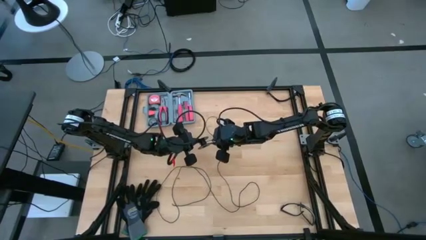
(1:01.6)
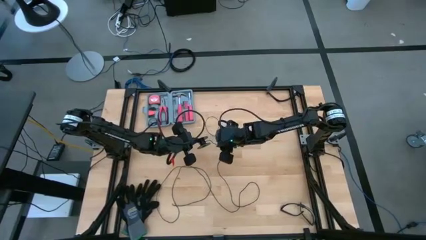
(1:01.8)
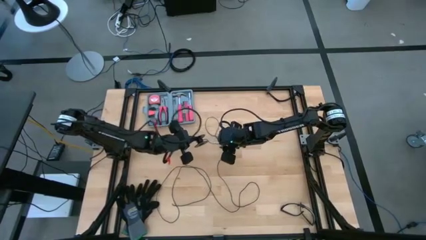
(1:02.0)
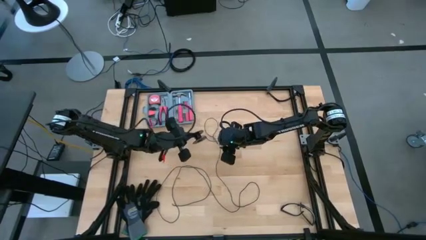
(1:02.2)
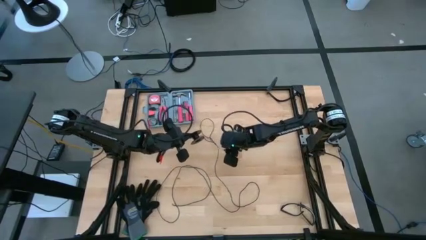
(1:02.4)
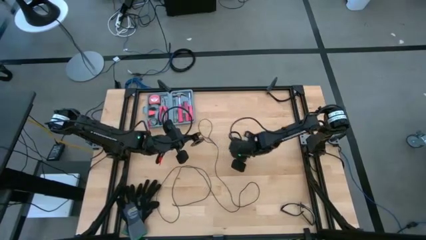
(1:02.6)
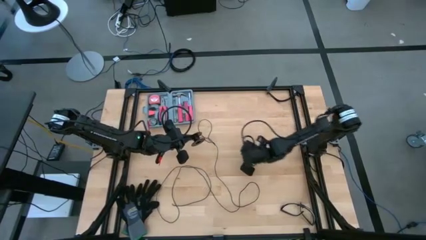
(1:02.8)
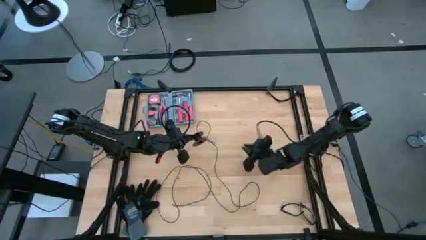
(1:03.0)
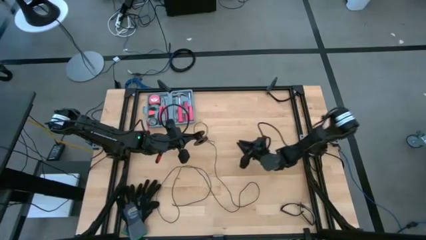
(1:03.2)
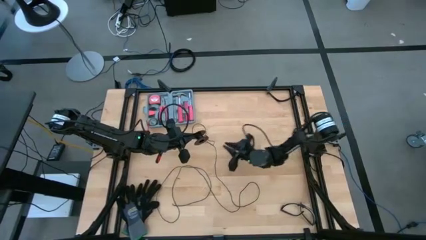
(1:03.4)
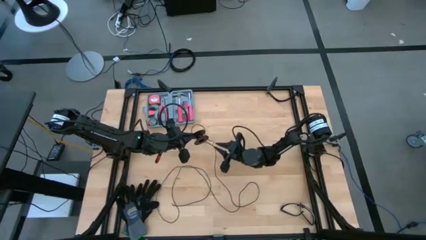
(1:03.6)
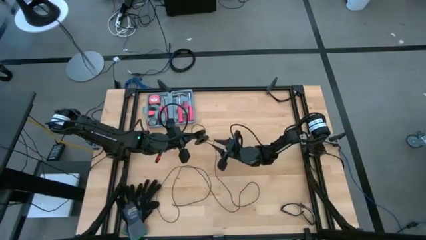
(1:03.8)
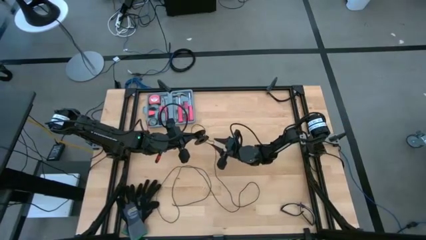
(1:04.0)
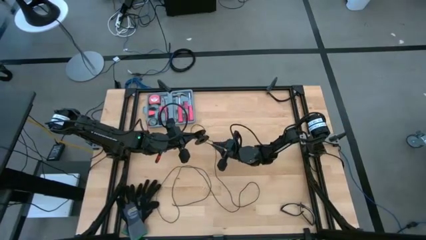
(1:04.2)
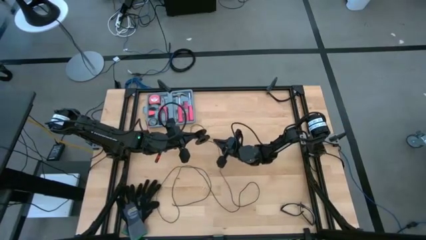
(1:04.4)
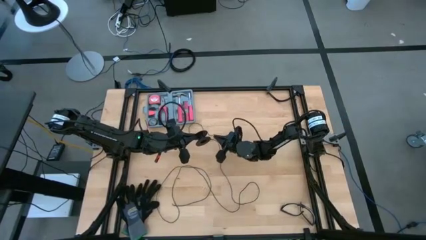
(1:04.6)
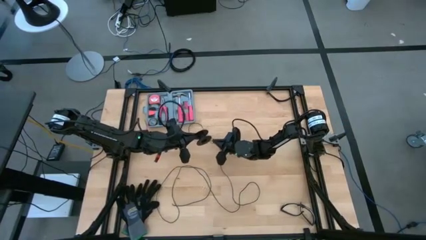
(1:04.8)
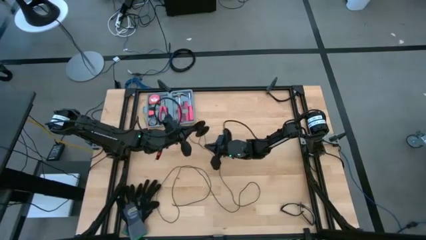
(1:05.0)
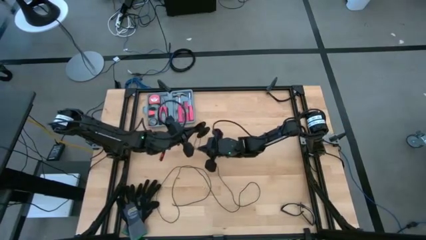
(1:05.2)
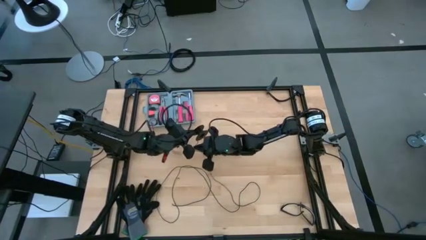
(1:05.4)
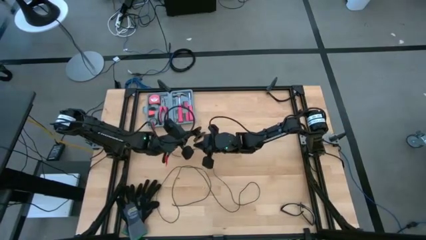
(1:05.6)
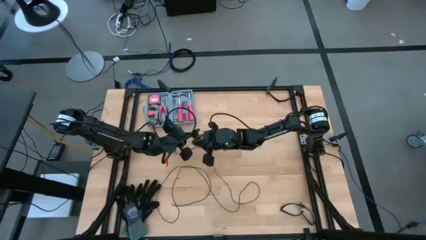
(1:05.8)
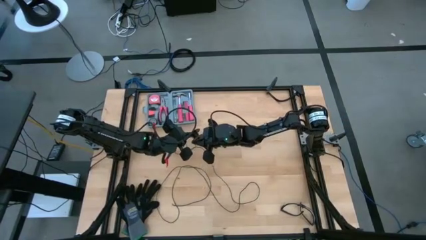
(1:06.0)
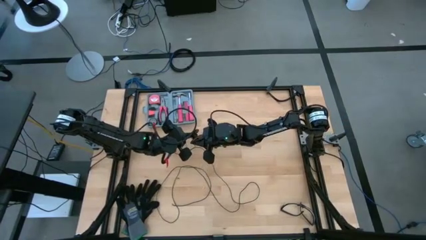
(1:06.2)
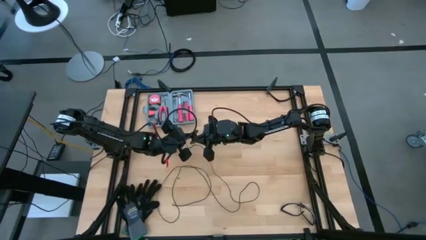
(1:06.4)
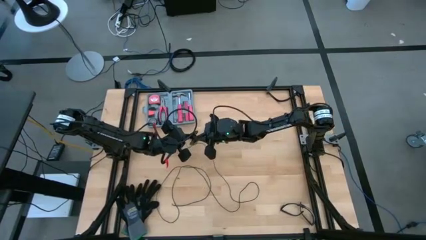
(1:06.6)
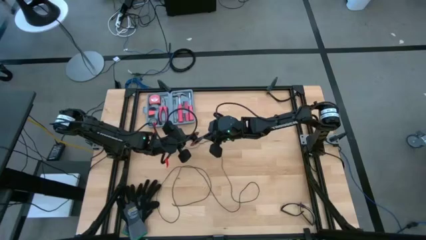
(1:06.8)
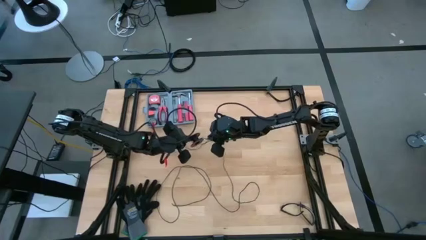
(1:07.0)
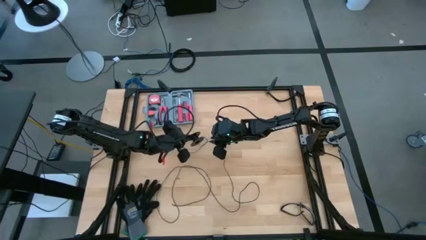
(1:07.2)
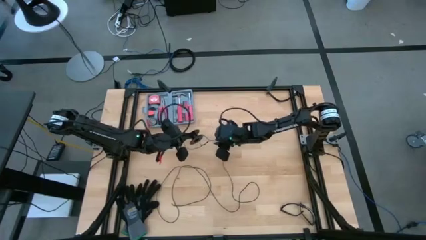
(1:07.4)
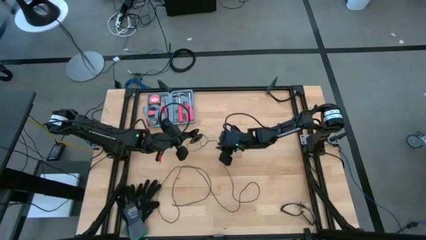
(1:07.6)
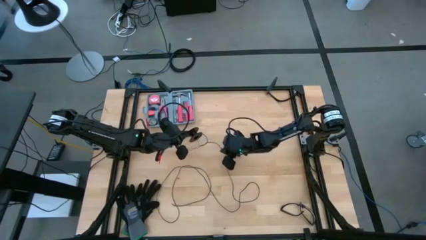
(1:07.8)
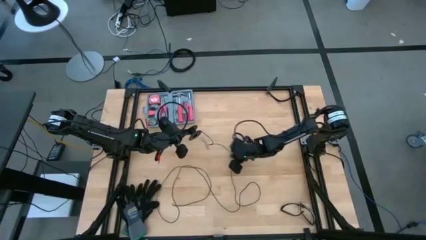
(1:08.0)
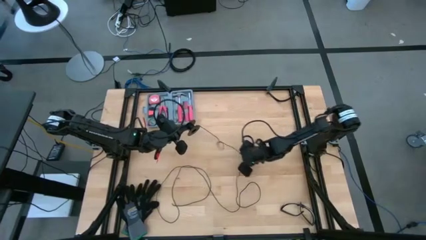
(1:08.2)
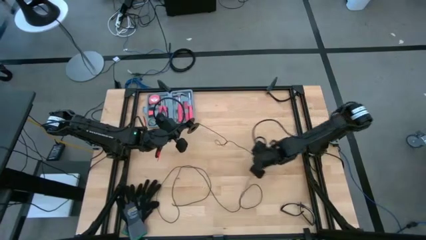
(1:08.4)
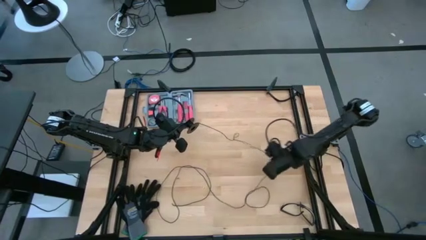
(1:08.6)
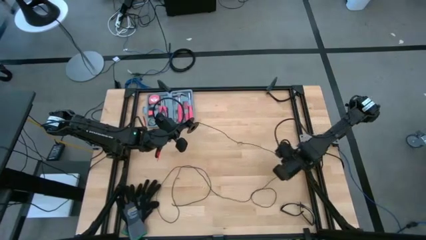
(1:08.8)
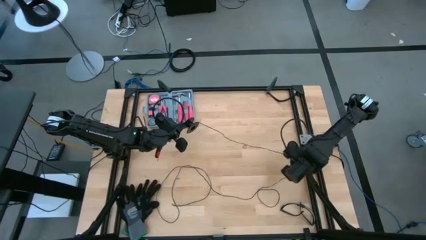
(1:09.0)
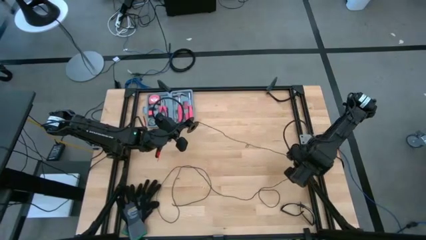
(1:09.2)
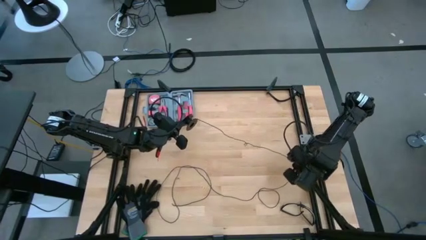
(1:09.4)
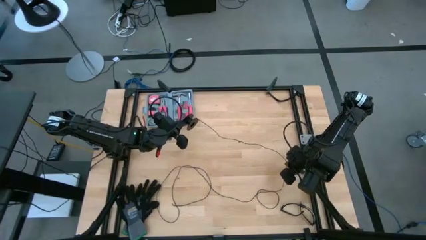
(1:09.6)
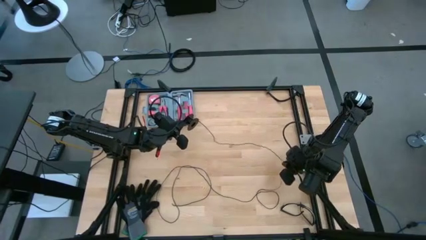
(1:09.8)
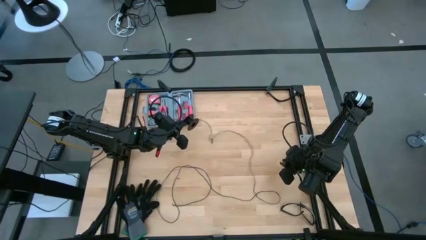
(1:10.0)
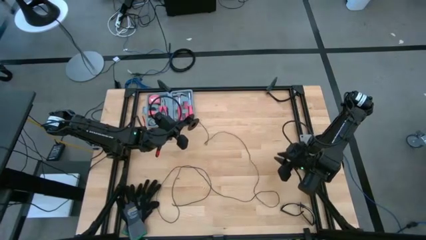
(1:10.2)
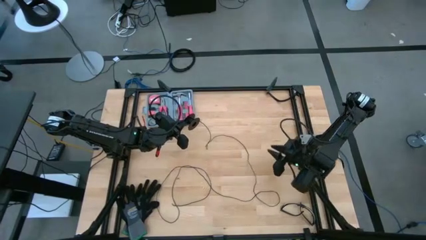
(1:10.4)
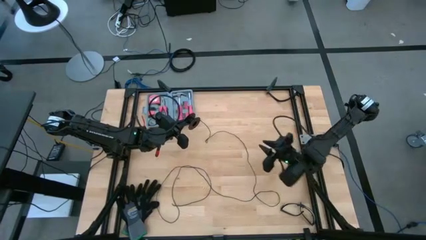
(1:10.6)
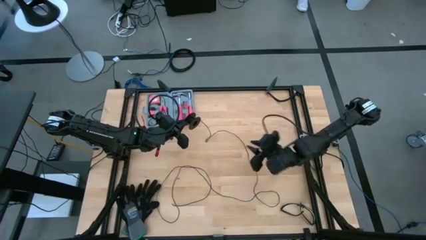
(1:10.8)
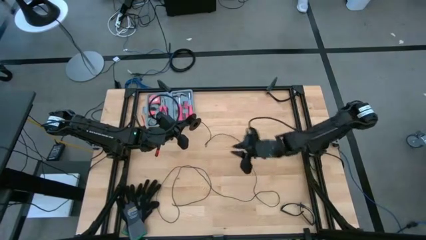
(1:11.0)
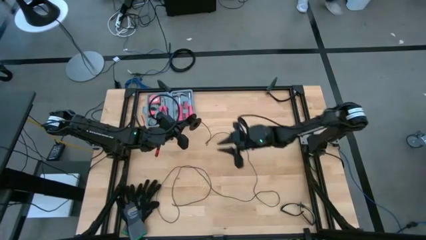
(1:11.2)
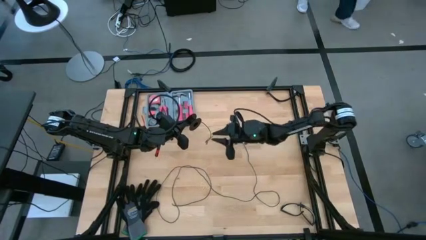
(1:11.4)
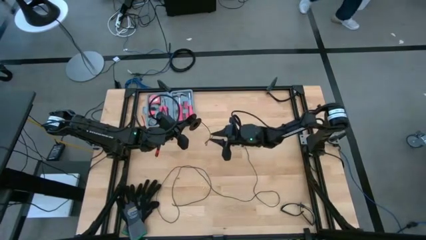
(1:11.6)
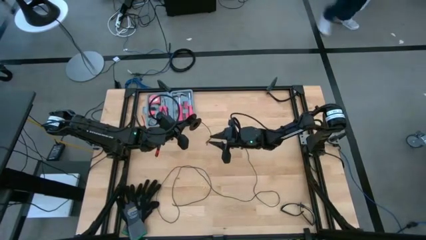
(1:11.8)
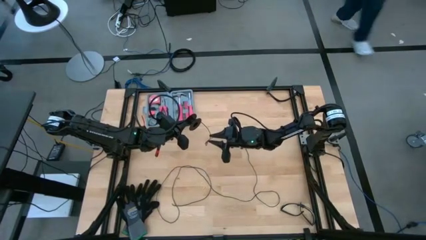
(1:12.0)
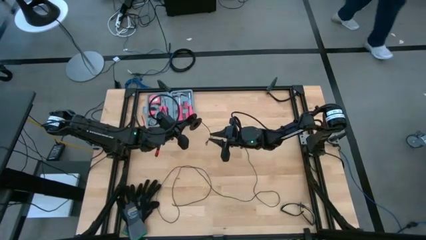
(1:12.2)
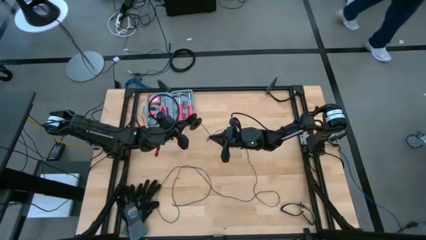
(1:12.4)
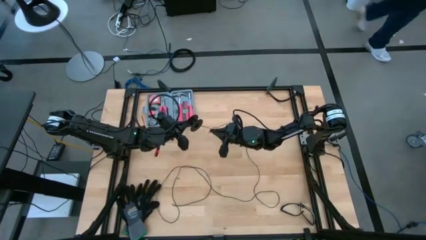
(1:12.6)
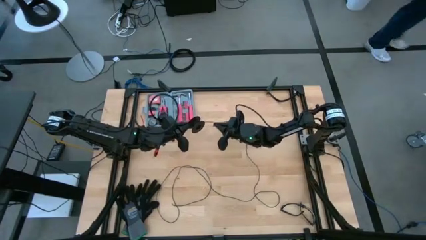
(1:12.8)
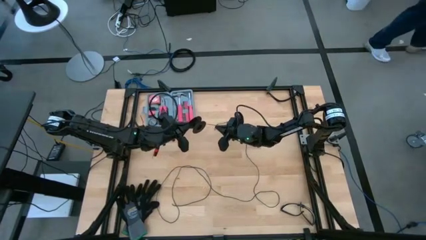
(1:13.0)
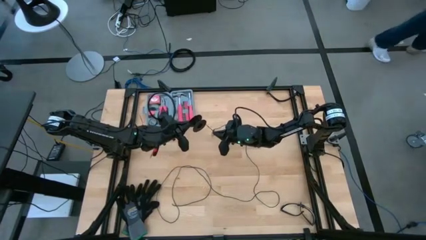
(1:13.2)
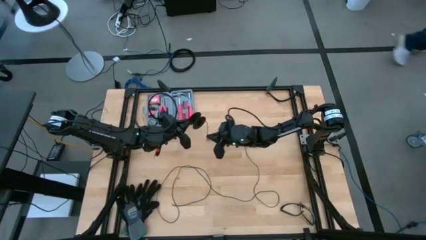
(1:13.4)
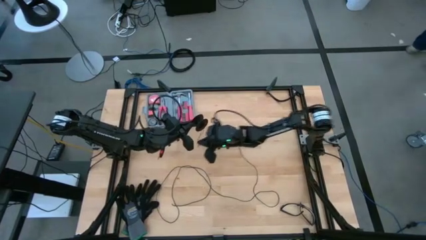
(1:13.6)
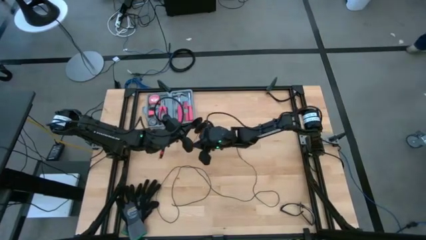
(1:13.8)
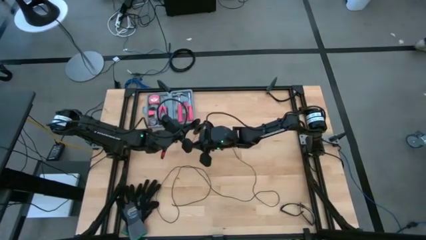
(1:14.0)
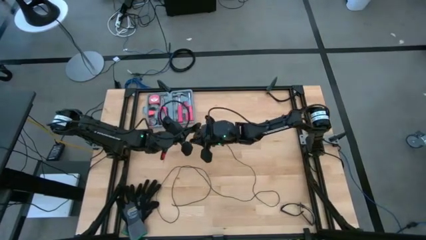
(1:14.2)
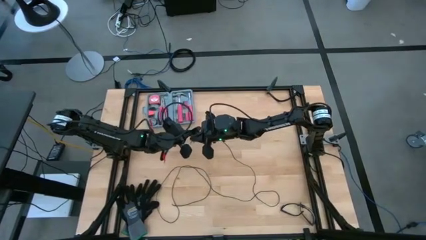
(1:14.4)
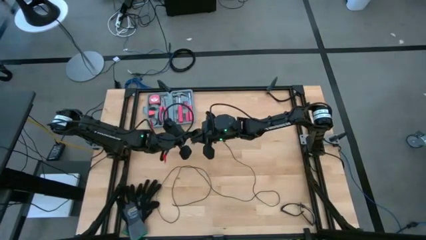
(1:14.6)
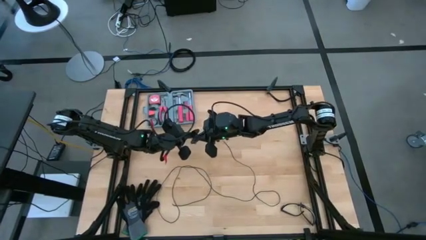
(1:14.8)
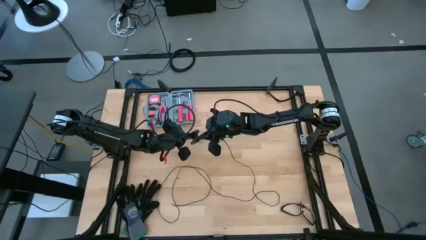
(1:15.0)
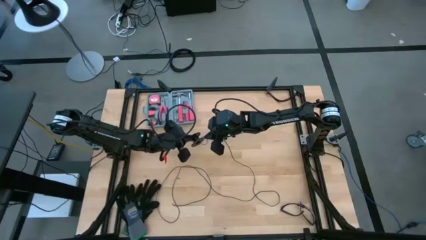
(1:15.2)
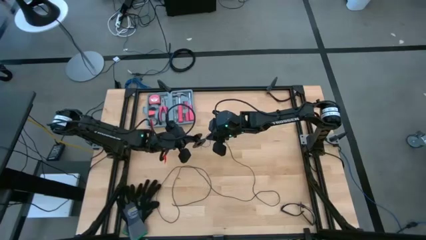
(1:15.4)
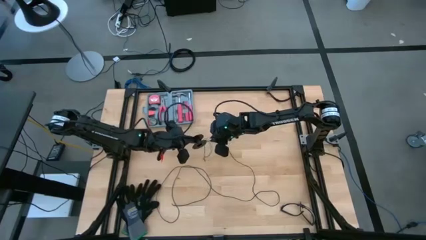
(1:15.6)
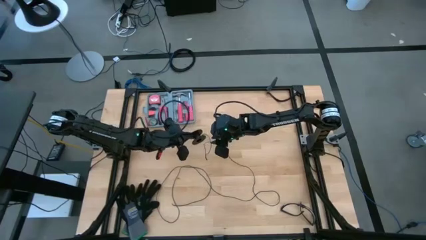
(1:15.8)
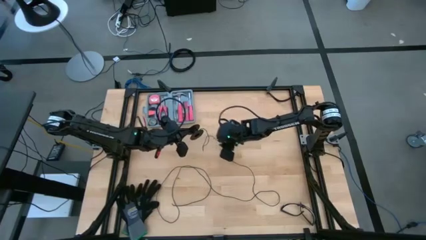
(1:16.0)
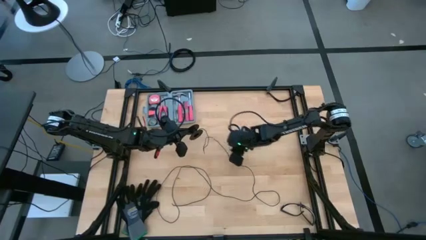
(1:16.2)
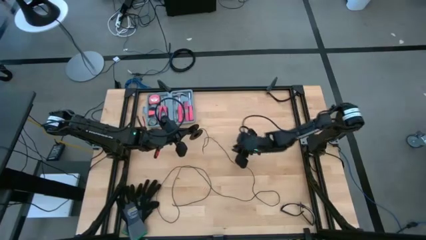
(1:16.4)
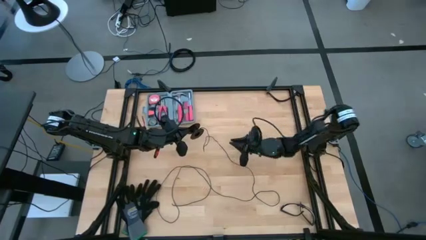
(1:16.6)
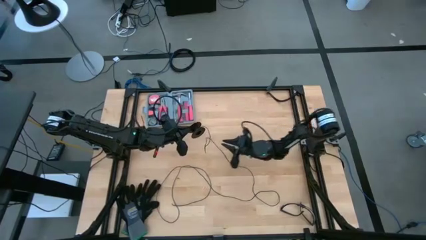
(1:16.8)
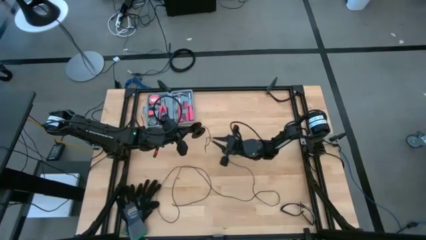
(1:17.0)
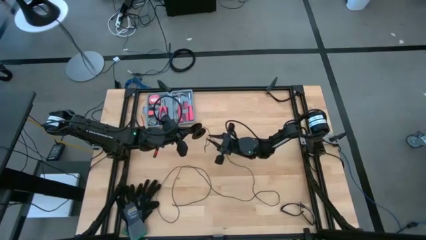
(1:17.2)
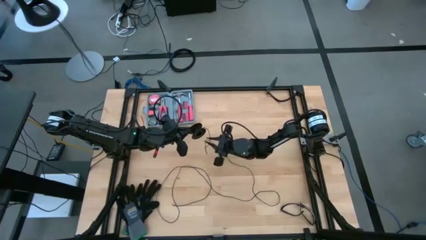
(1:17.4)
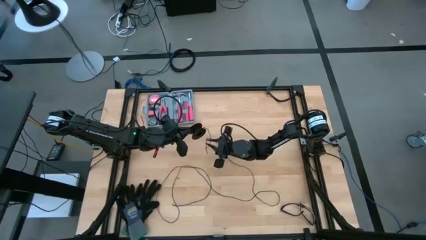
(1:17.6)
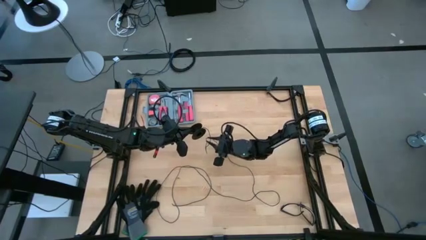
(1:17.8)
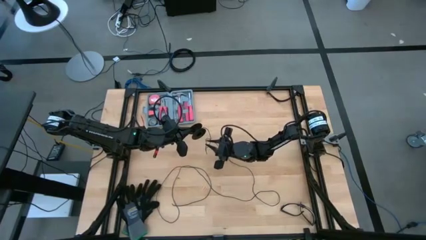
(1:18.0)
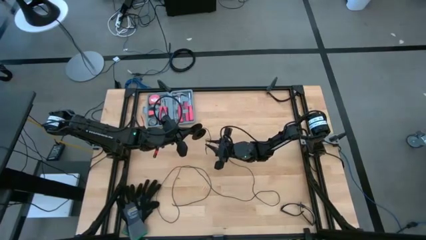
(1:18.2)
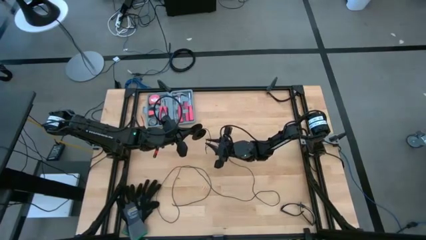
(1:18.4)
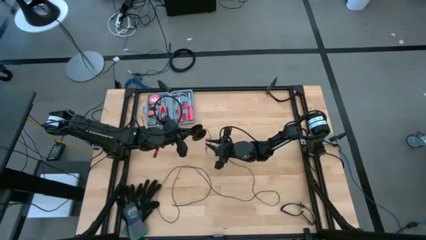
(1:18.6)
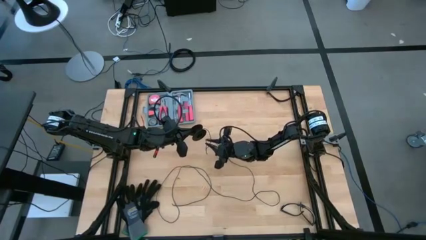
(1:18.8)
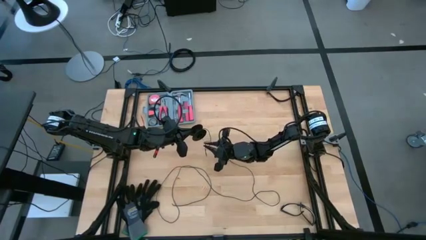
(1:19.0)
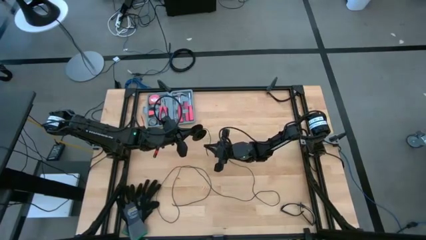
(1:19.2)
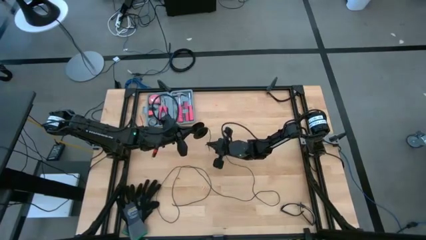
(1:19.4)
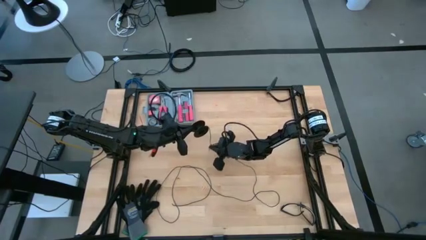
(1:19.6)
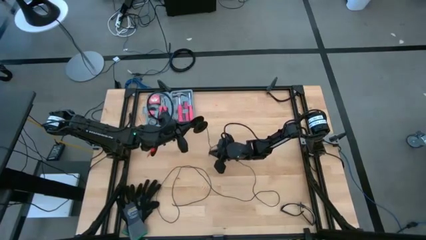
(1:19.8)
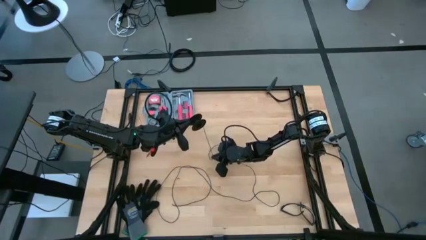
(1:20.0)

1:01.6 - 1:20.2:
Task: Coil cords
Coil the black wire onto the spool
